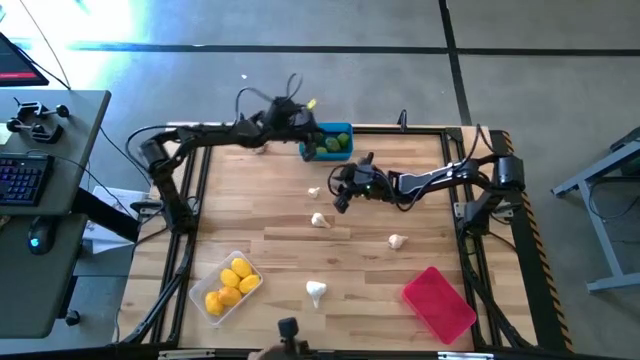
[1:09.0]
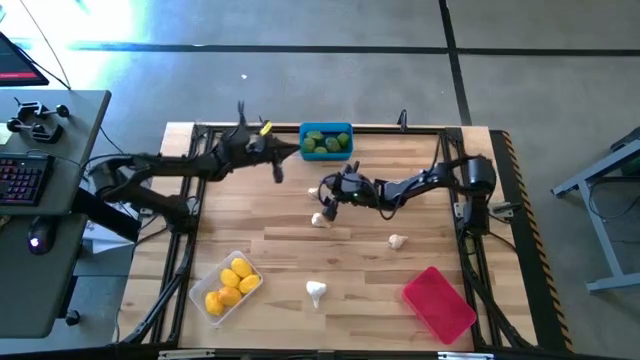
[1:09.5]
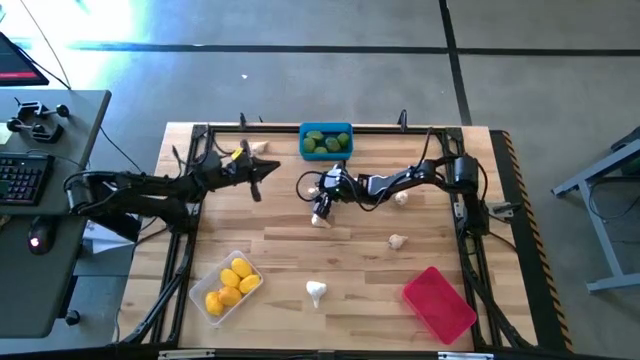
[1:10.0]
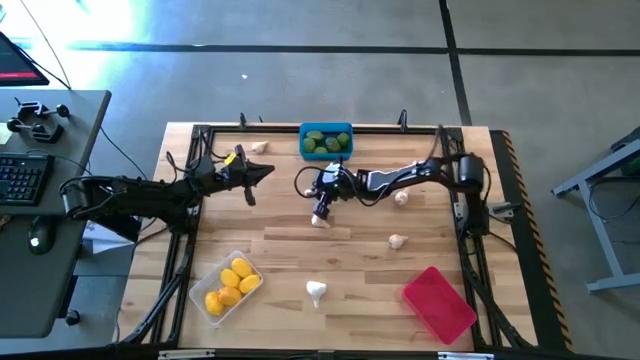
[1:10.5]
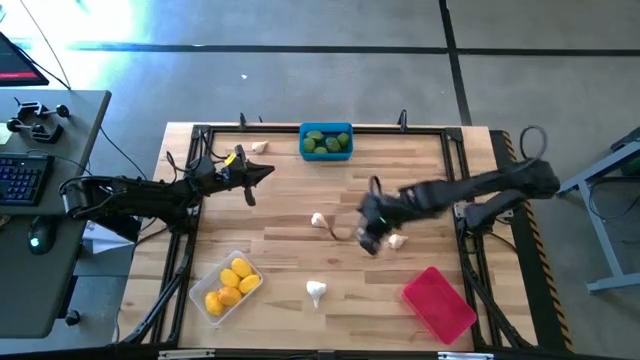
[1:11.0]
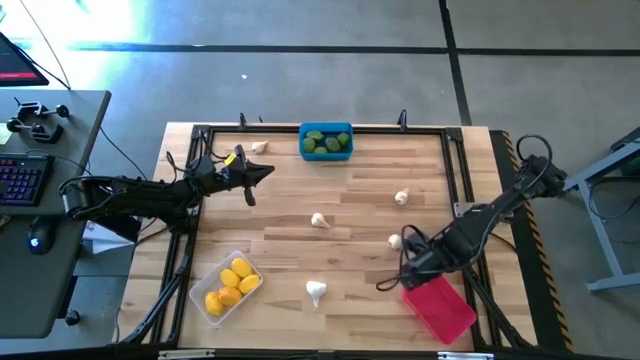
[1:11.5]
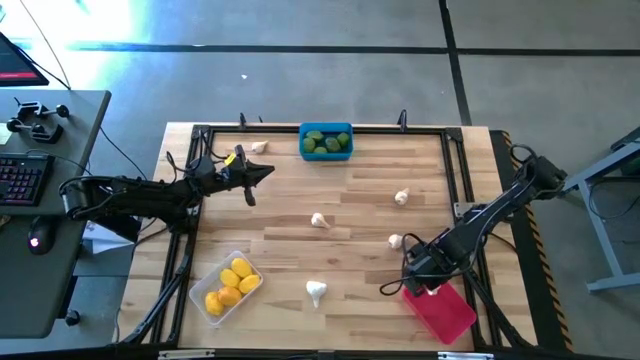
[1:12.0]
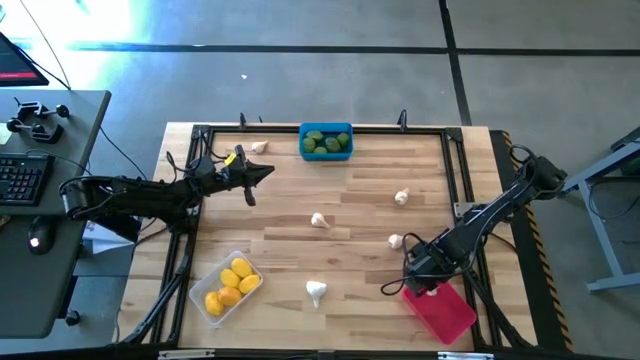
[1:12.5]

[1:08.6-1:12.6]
Task: Sort produce into baskets
Put the garlic into the red bin

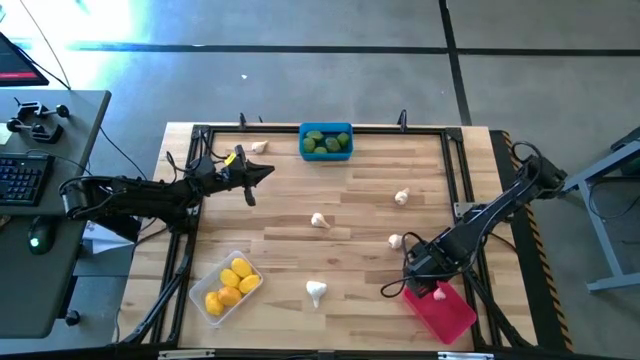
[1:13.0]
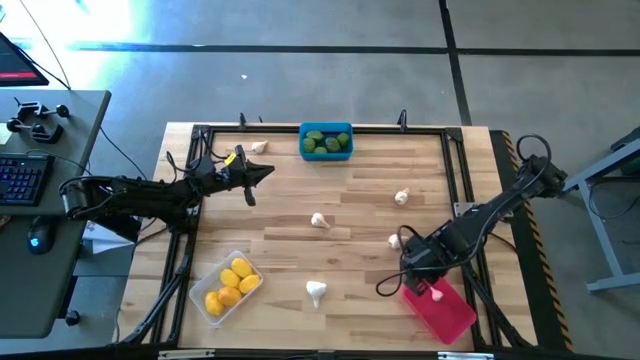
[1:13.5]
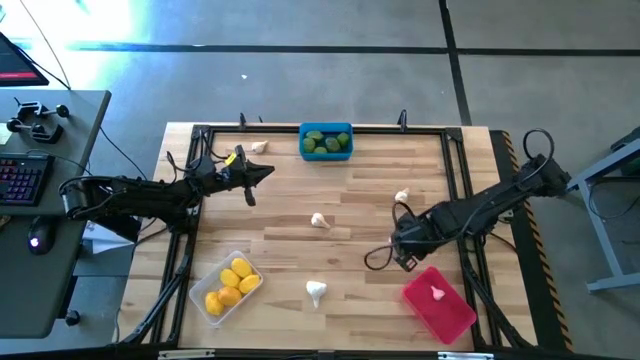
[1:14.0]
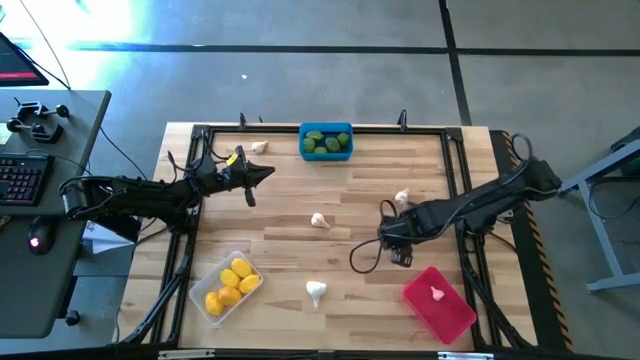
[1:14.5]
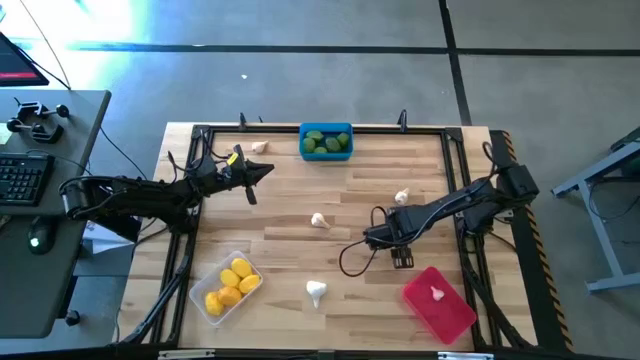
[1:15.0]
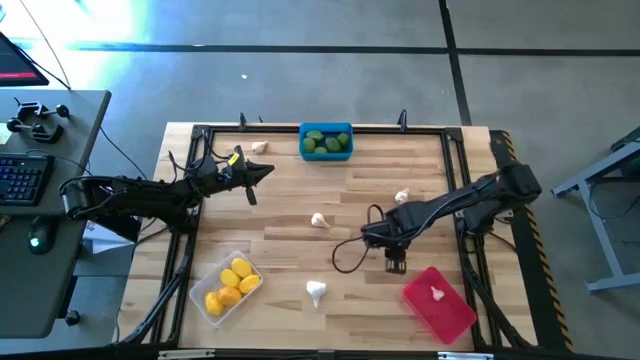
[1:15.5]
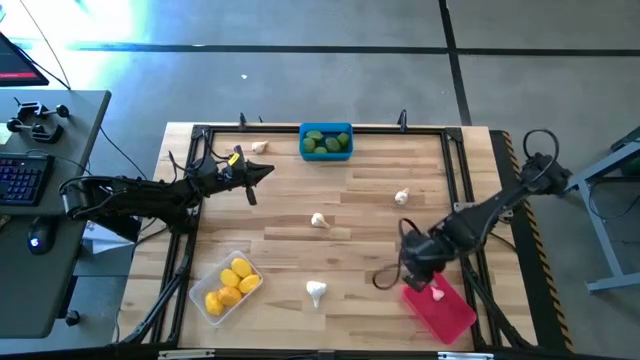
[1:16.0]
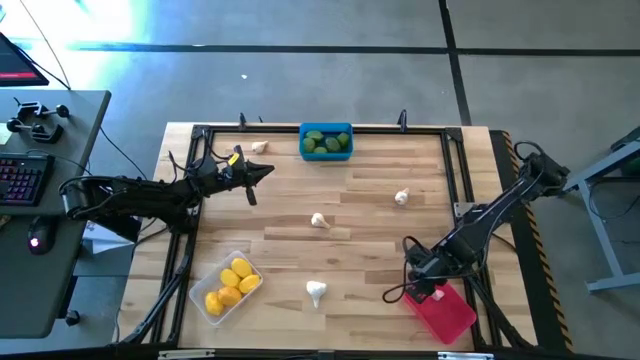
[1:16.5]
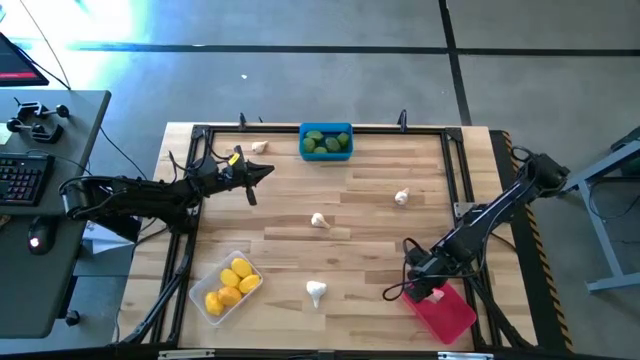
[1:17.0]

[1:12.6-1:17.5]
Put the garlic into the red bin

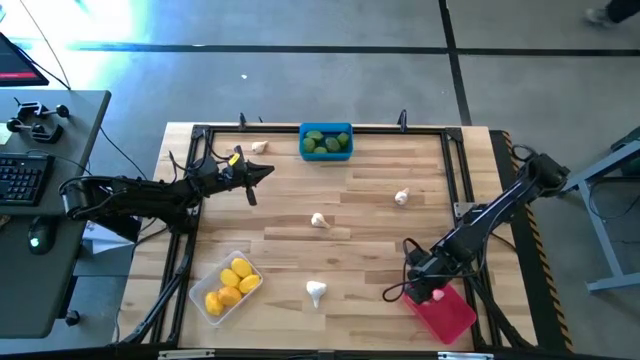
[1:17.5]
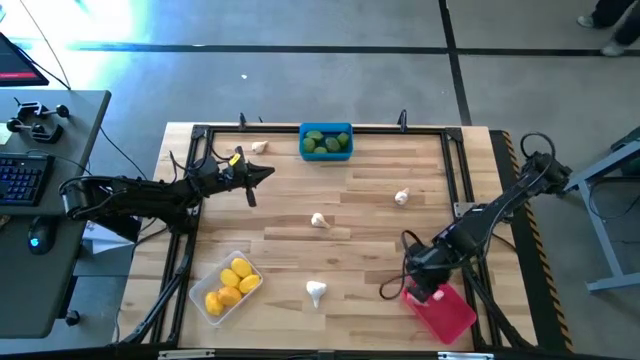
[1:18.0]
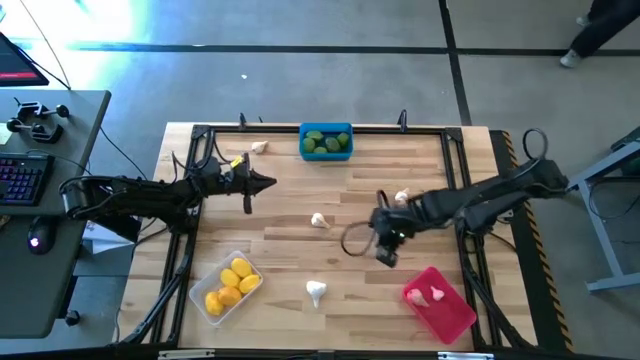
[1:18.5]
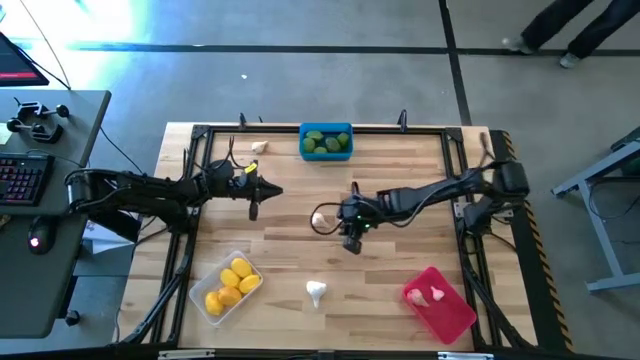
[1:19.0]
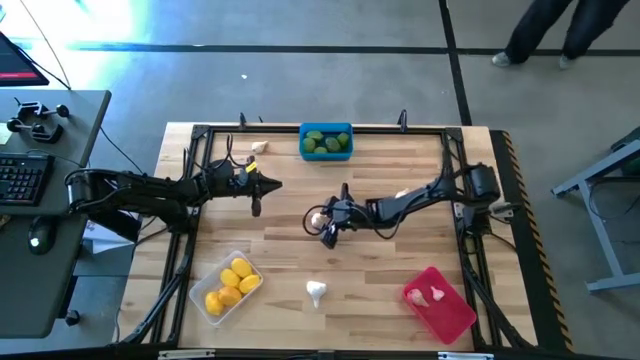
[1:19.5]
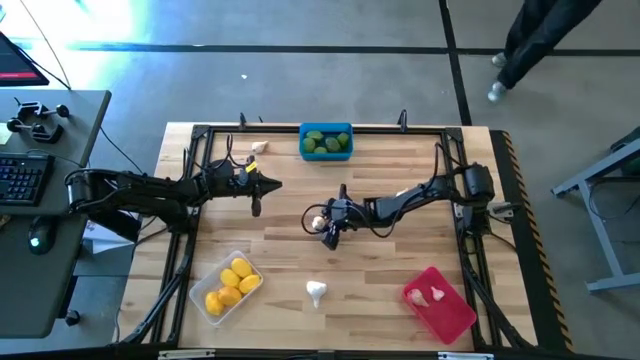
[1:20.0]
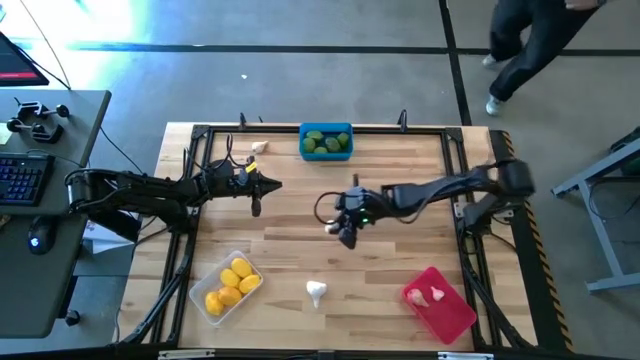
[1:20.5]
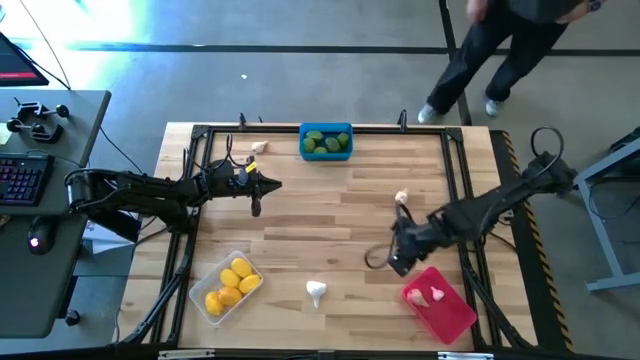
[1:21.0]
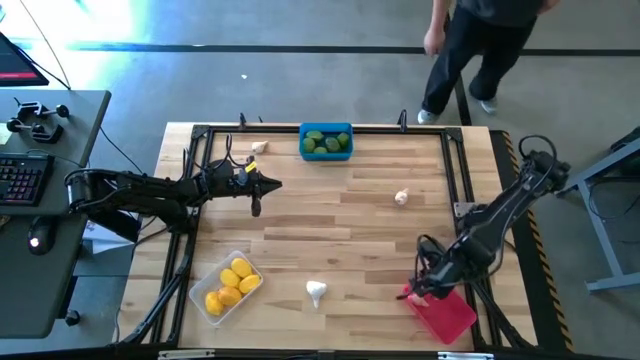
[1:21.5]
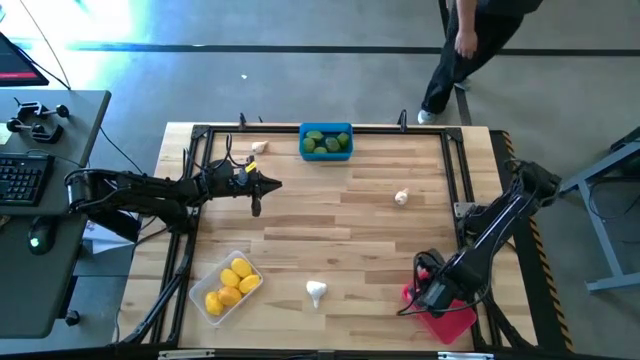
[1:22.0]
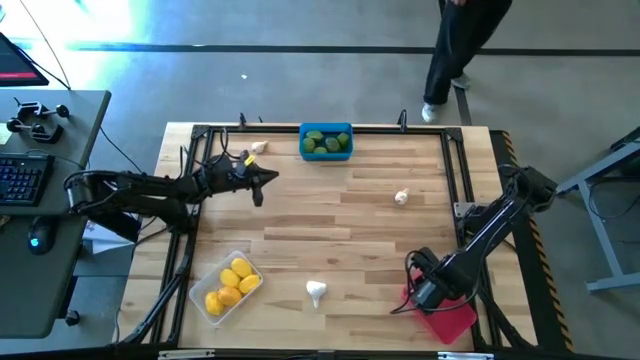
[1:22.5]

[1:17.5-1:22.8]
Put the garlic into the red bin

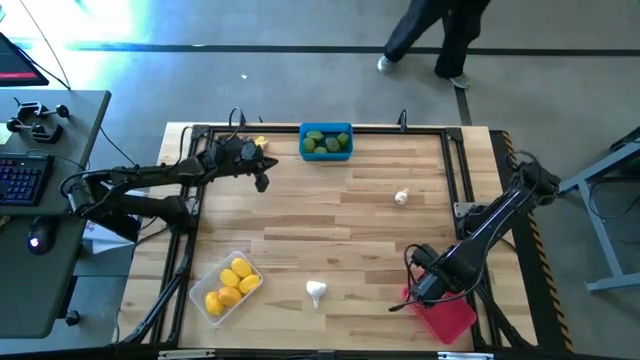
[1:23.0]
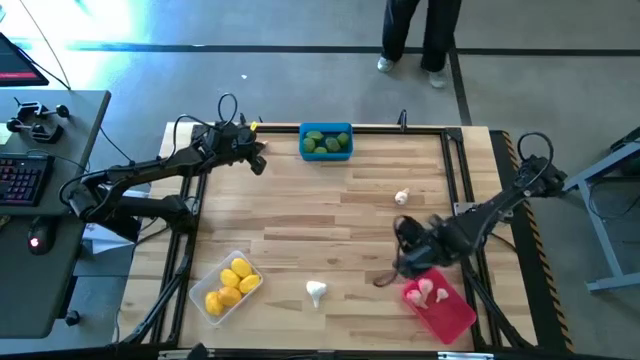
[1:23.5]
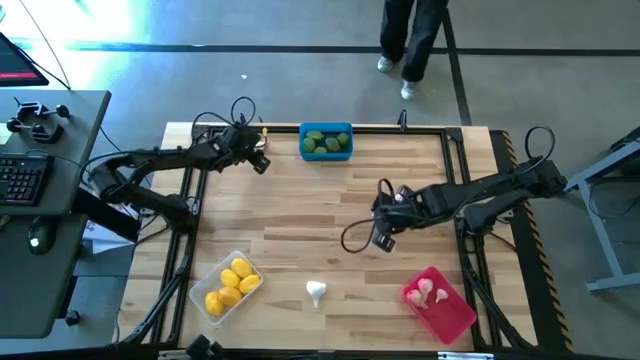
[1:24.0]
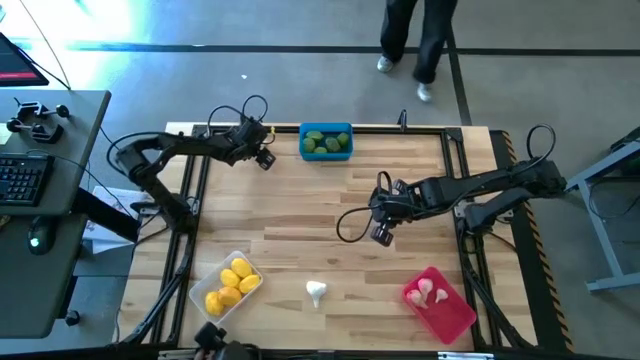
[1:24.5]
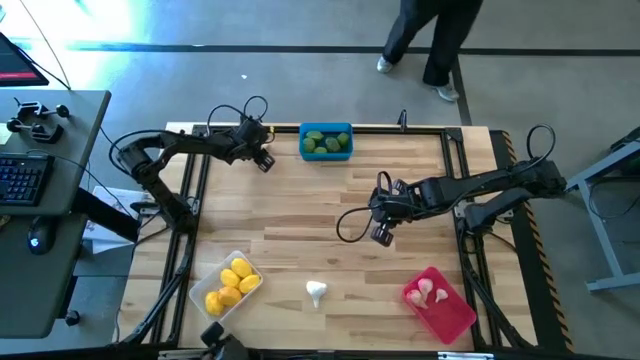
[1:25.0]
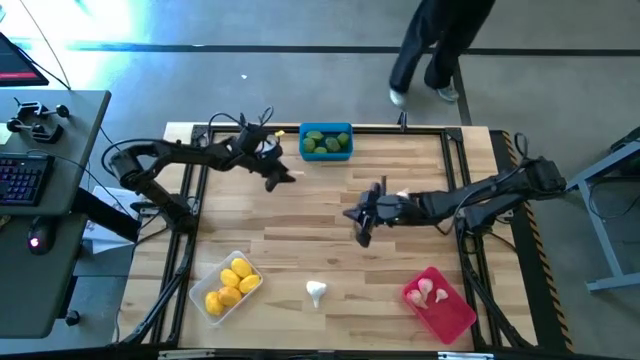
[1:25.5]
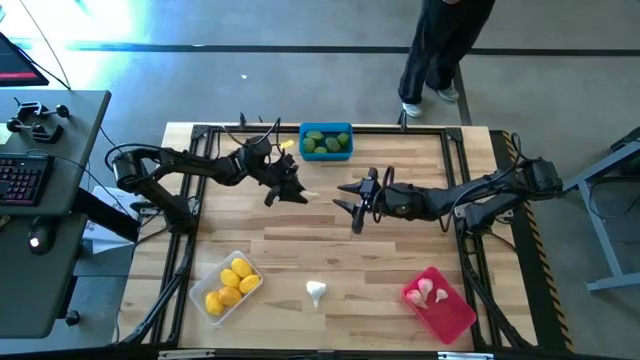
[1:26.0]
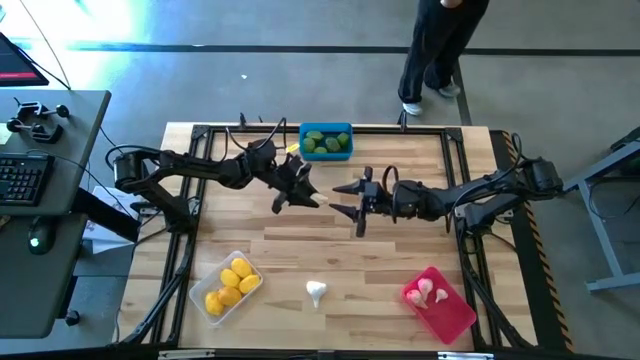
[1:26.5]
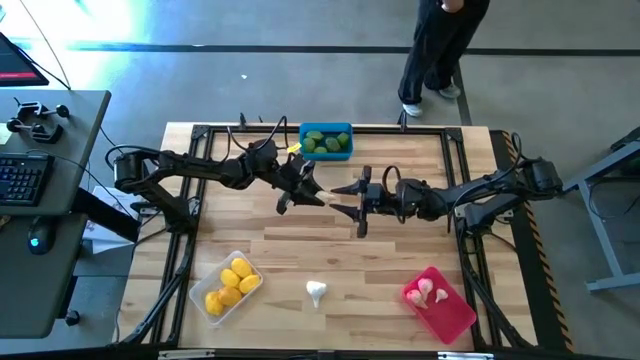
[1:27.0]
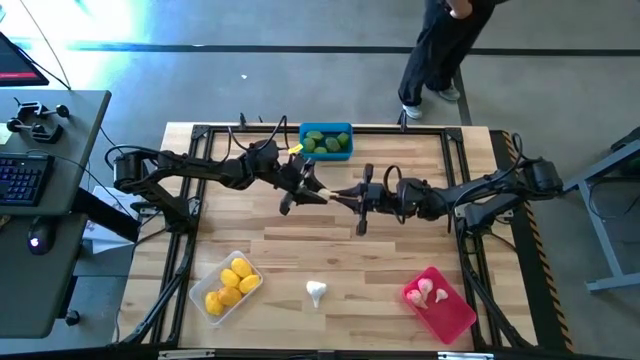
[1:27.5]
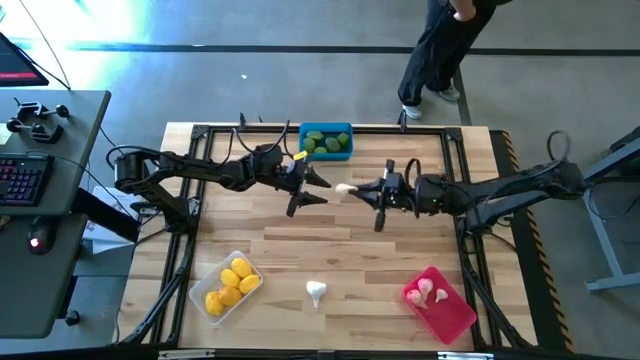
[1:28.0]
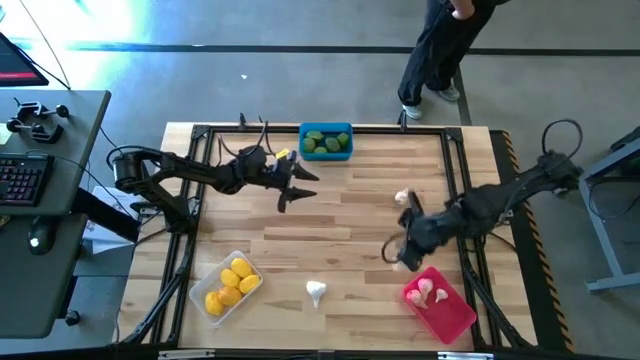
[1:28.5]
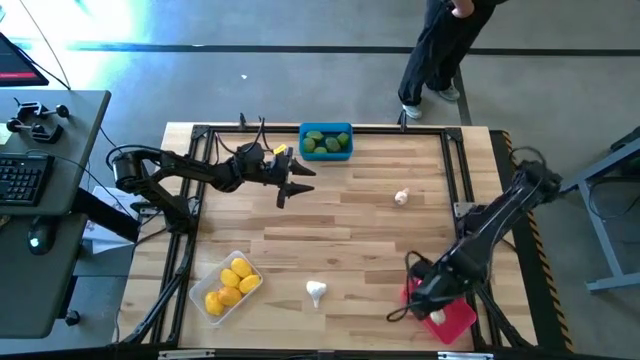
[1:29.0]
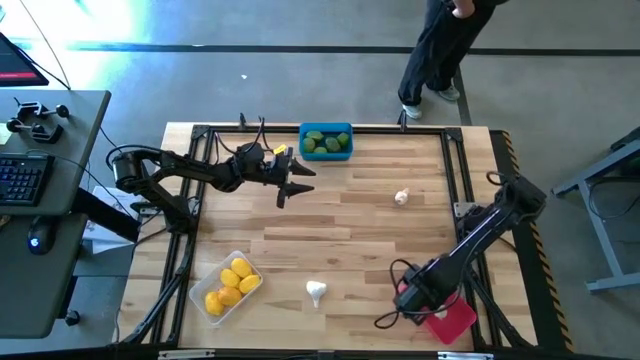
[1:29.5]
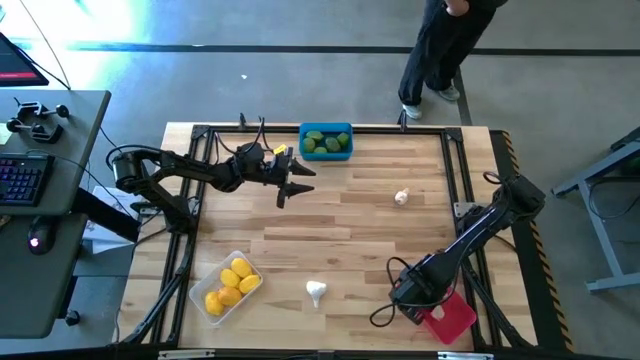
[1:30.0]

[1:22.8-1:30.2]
Put the garlic into the red bin
